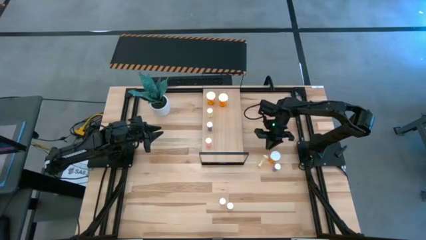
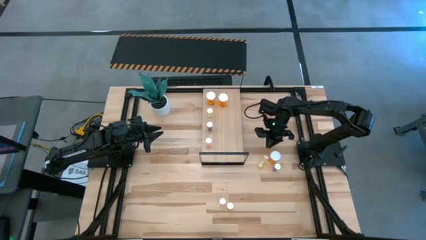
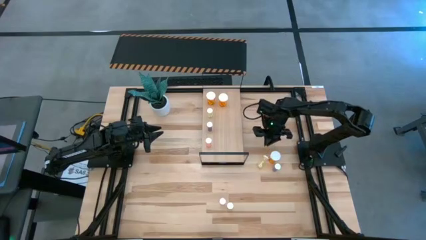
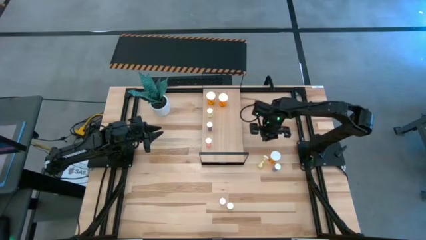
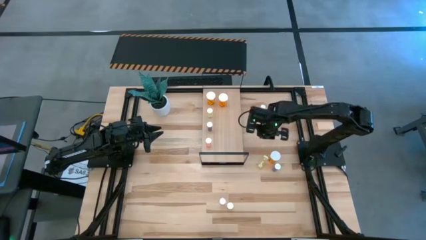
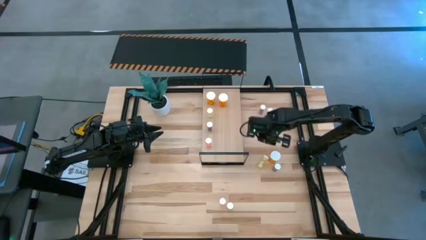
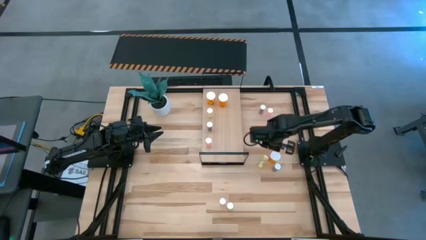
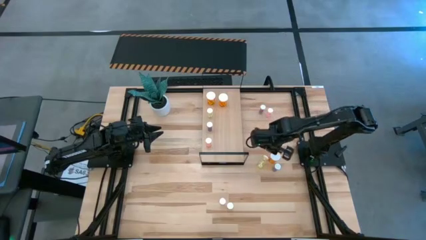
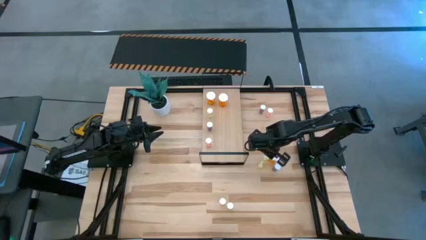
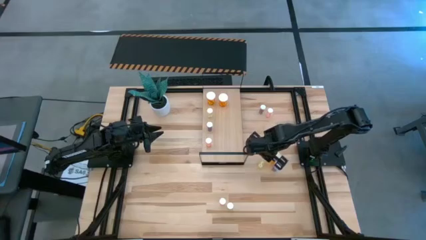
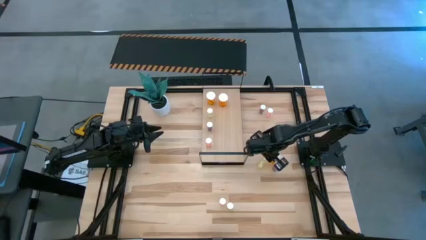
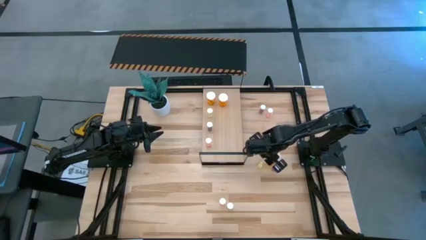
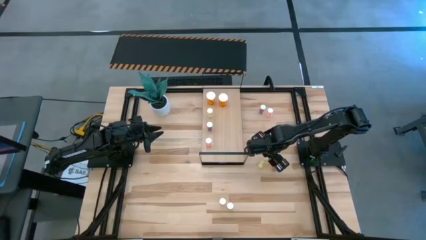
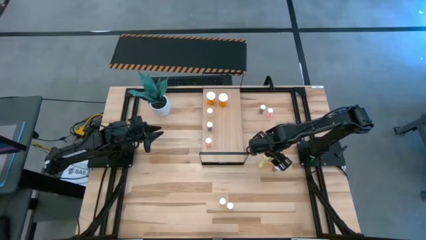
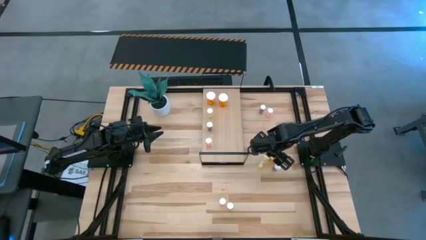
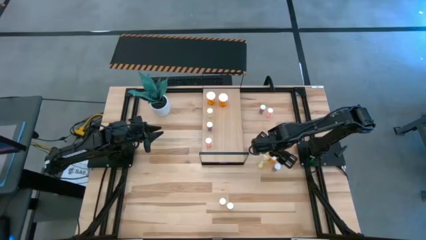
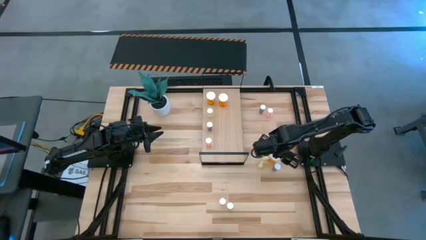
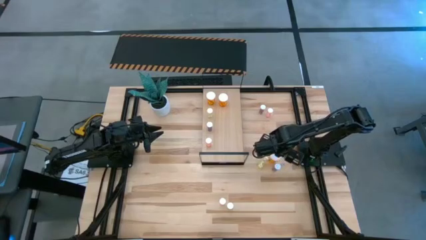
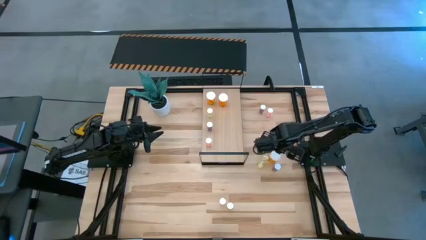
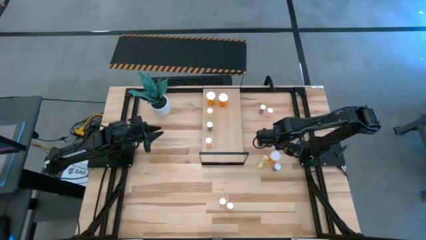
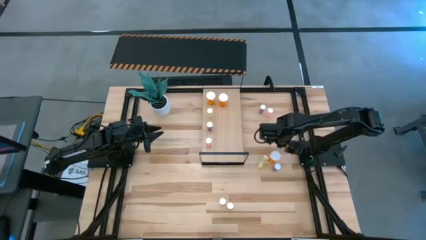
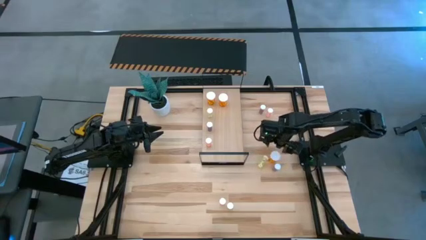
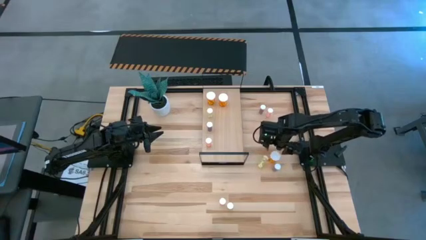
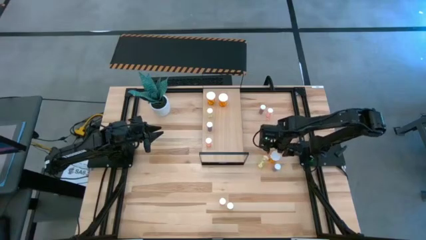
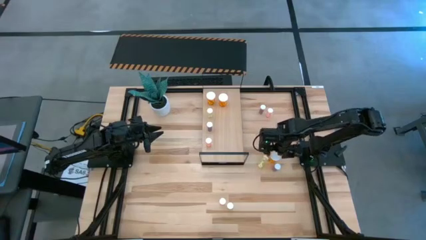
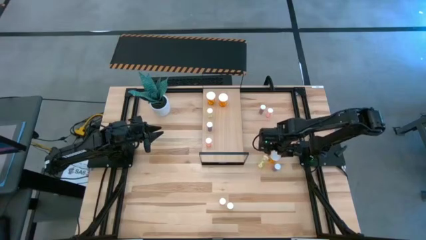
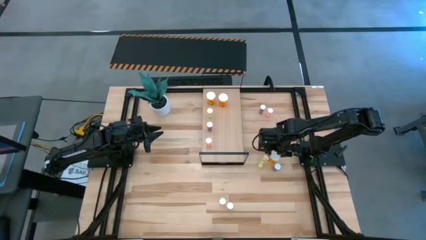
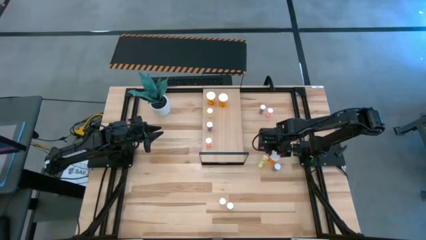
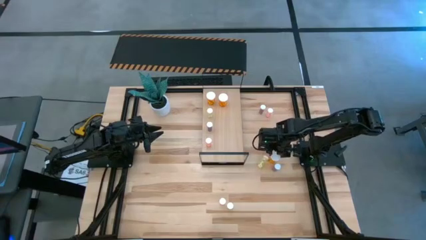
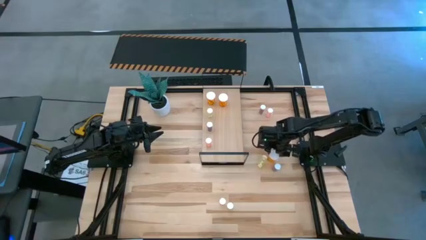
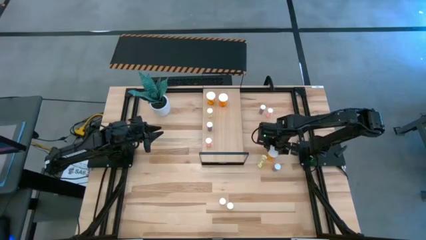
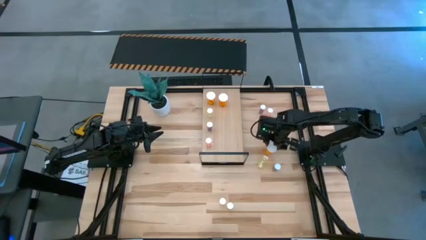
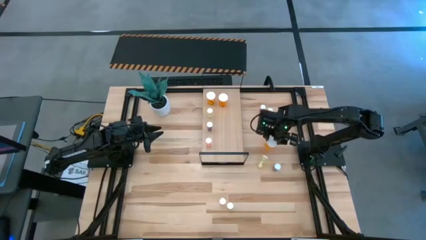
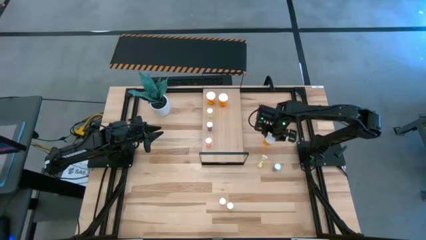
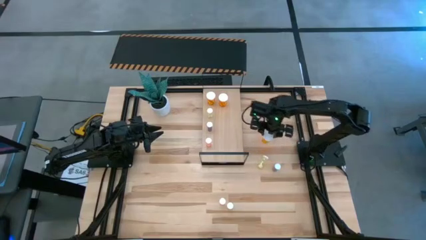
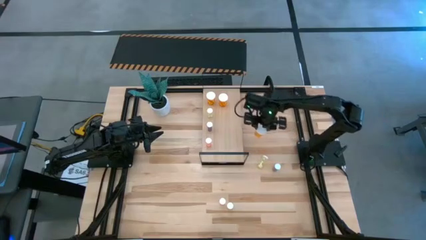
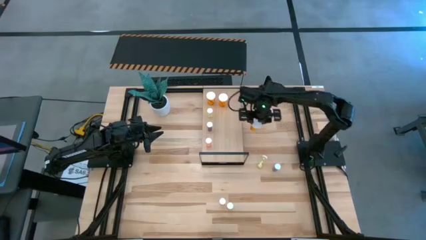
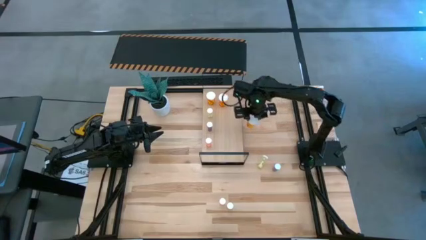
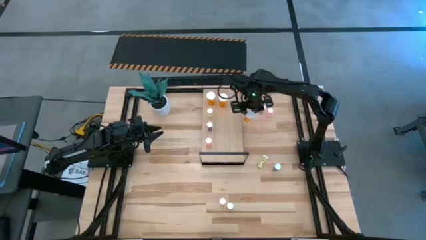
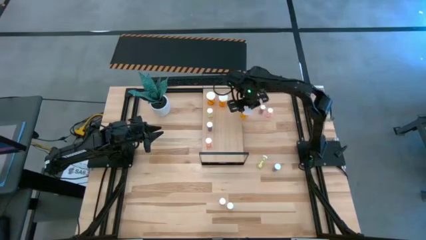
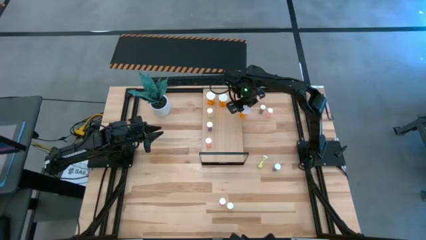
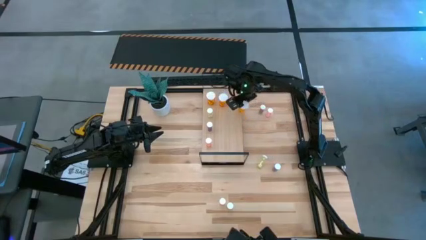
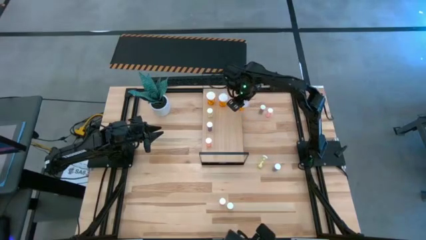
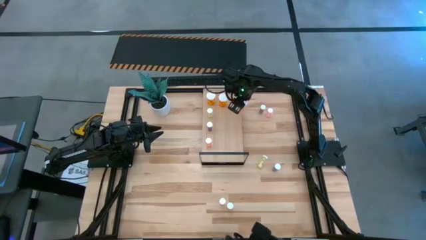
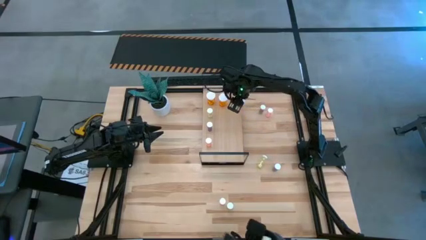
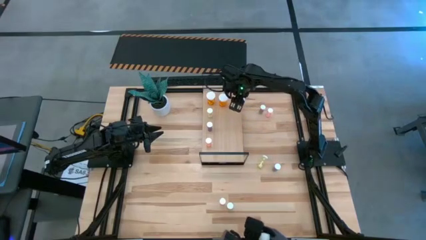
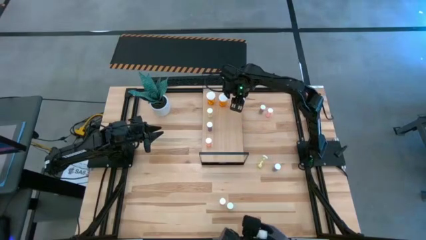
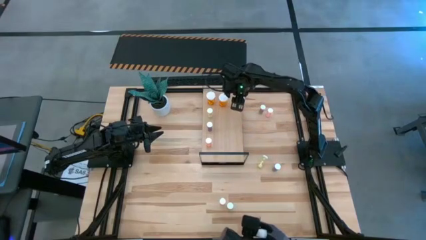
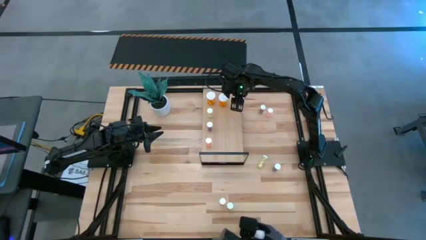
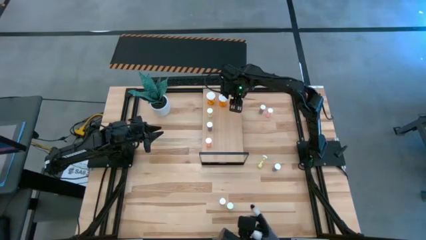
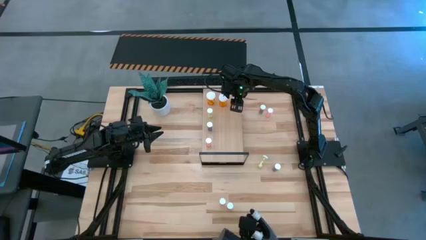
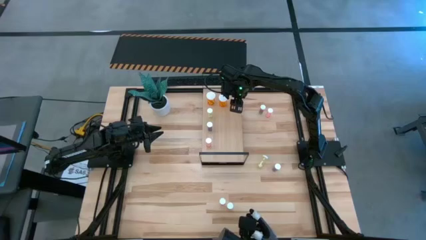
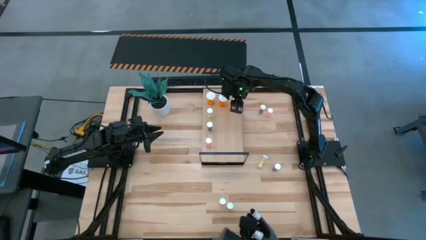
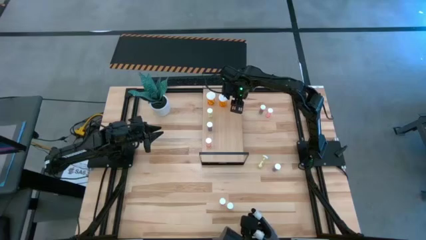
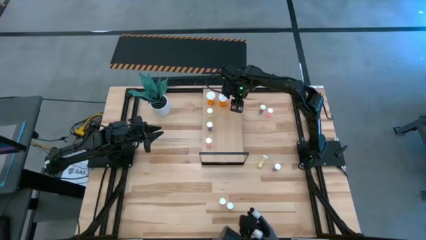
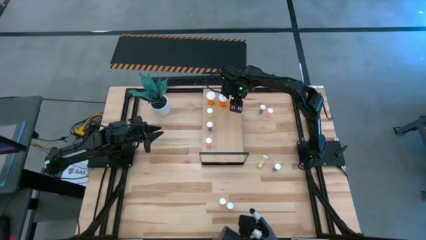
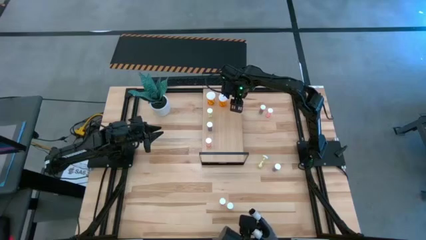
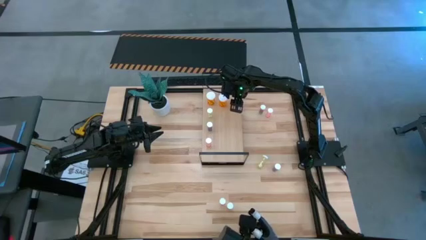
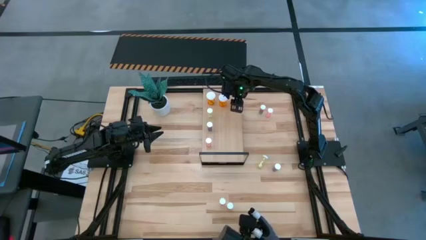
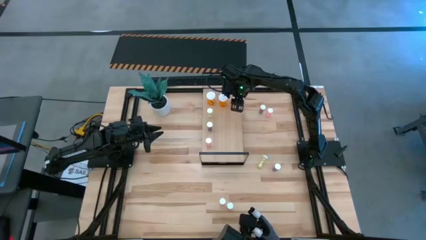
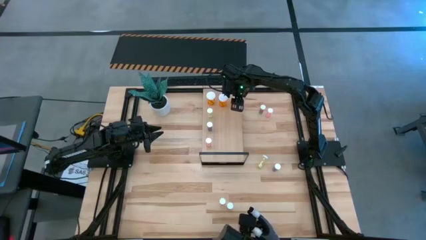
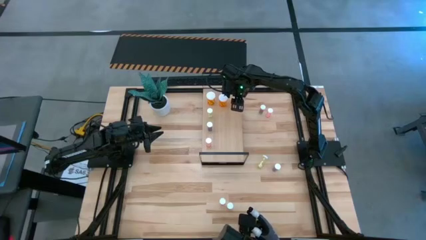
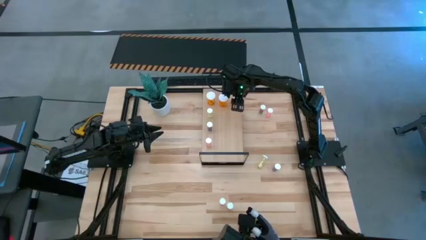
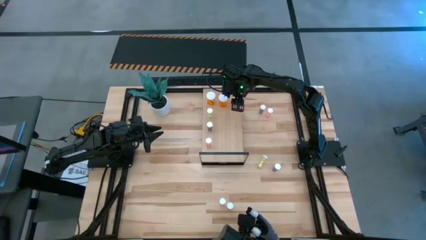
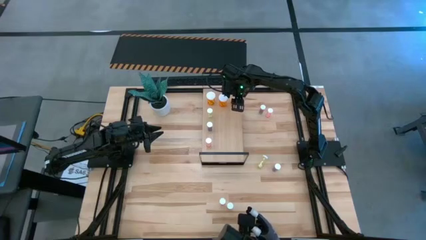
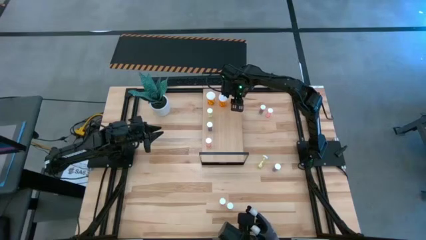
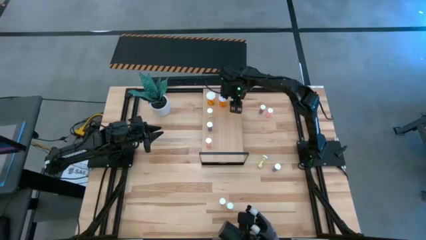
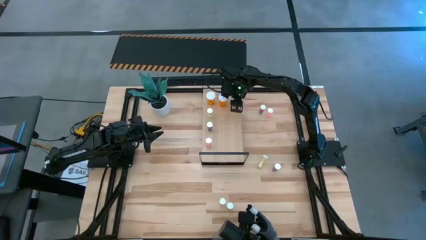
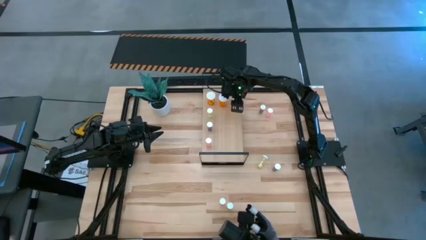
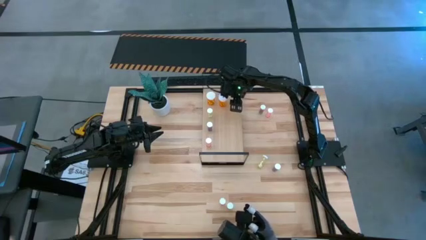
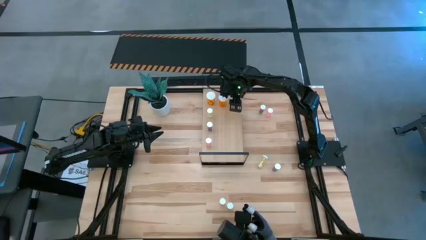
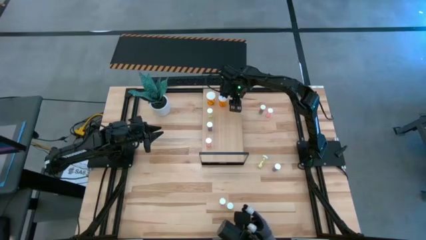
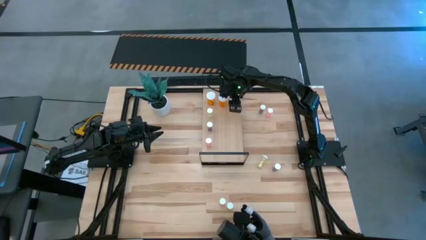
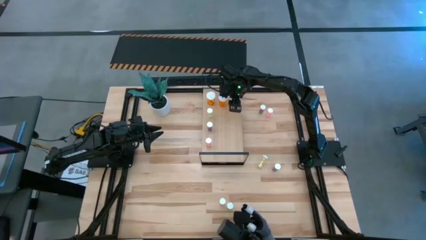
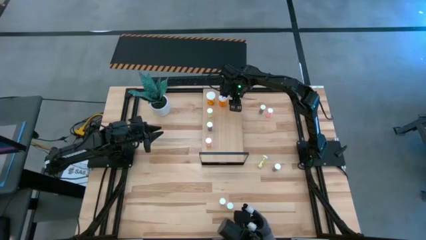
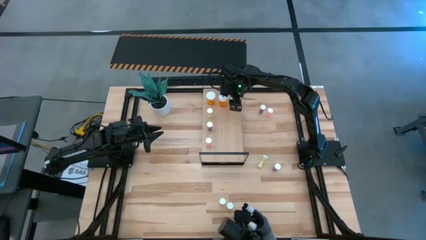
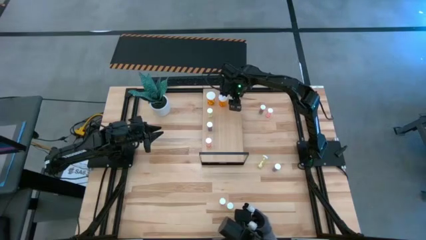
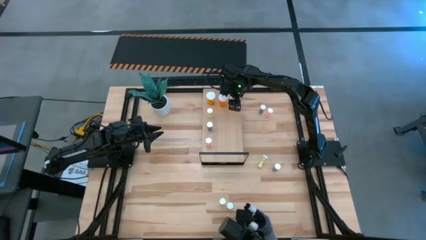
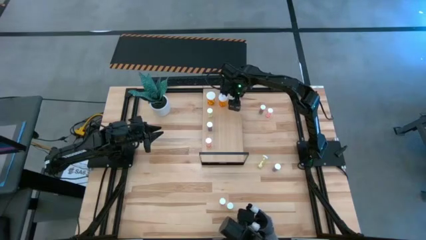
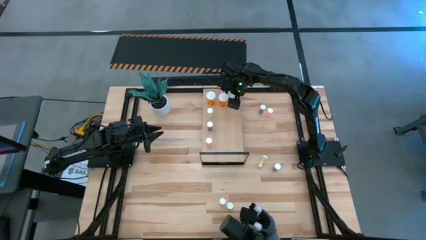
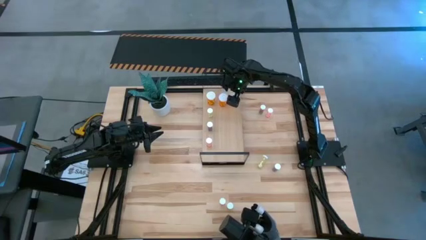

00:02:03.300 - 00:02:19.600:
Task: Pick and place medicine bottles onto shelf by color
Put the large orange pill bottle on the shelf aligned with the other large orange pill bottles

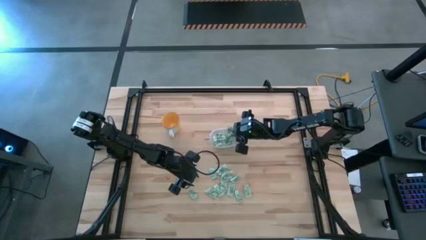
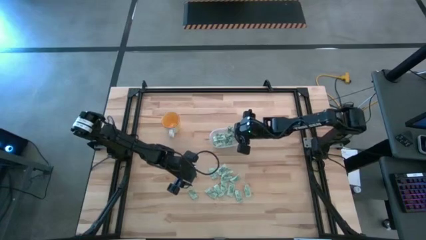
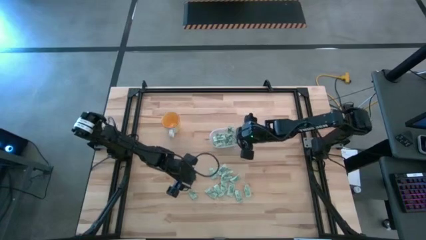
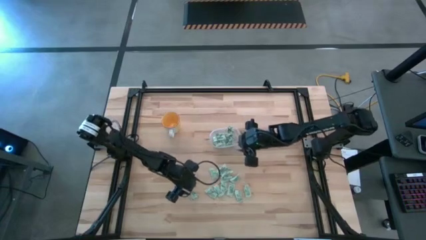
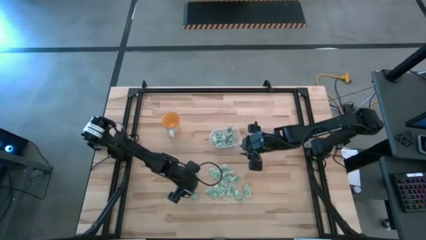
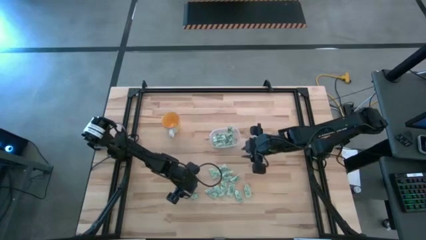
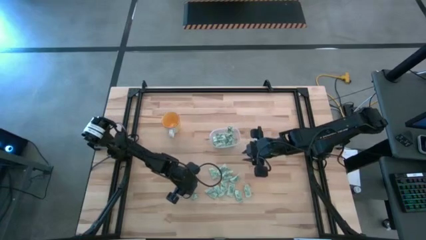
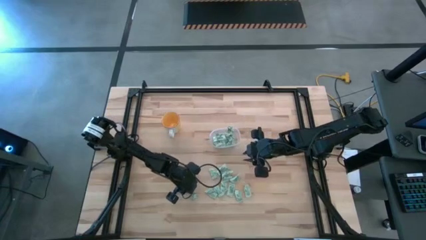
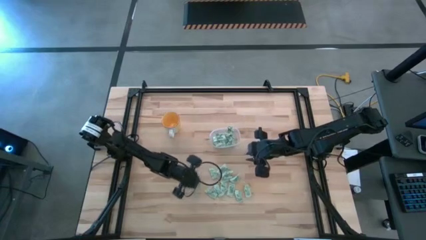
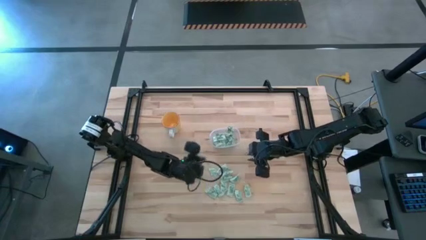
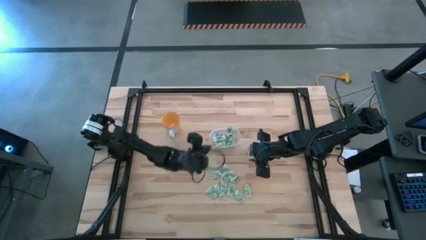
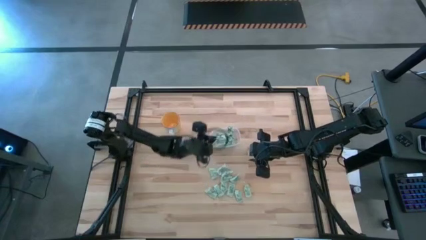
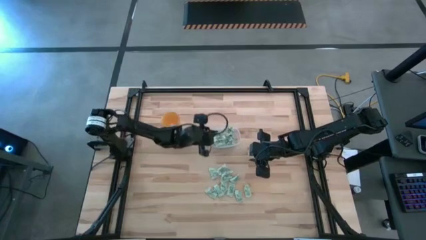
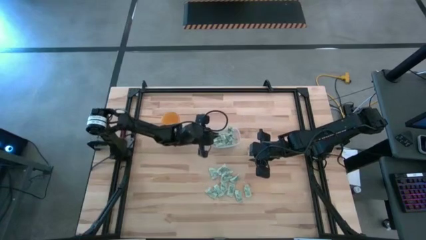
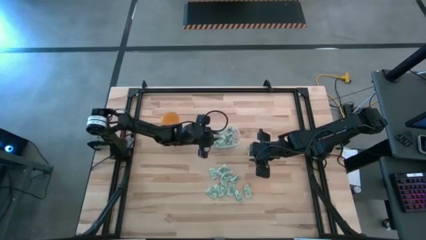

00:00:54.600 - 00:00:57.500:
Task: Pick and place Stevia / Truvia into bins
Put the stevia packet into the transparent bin
